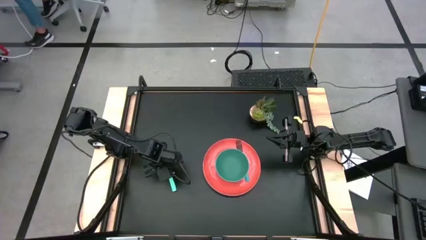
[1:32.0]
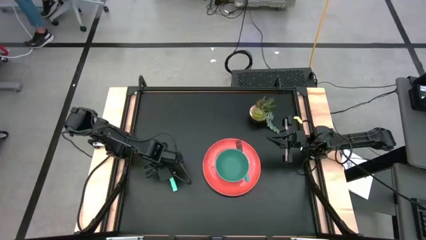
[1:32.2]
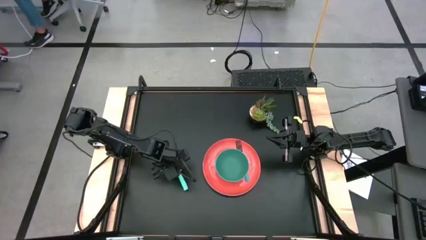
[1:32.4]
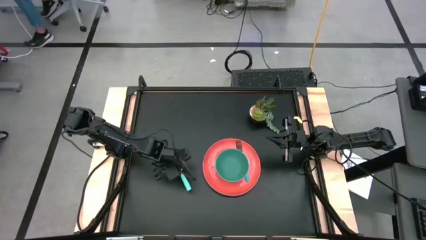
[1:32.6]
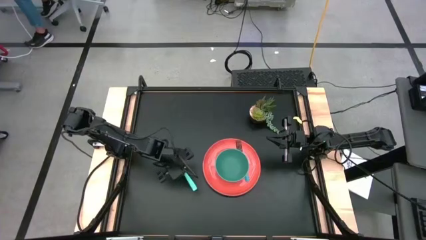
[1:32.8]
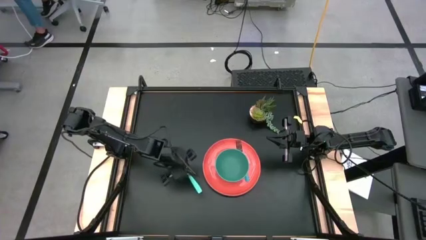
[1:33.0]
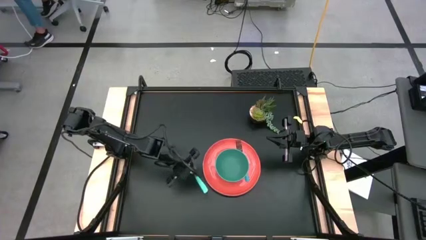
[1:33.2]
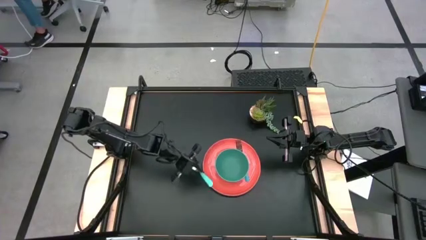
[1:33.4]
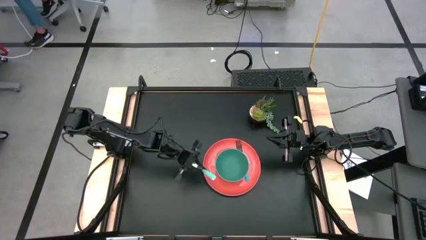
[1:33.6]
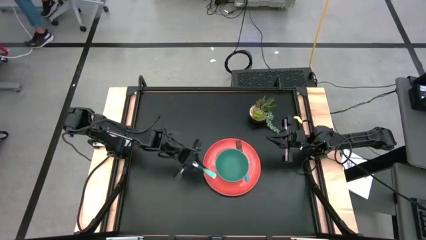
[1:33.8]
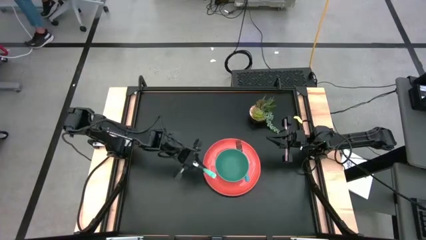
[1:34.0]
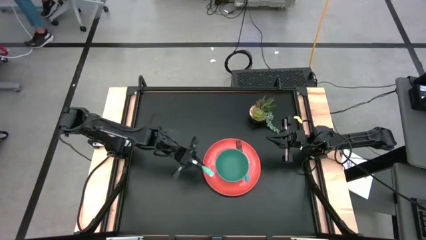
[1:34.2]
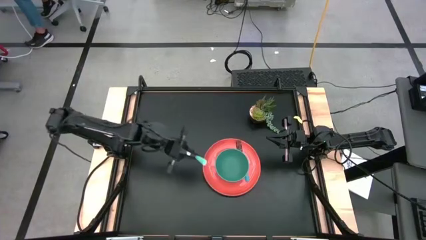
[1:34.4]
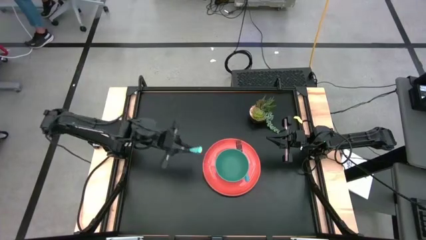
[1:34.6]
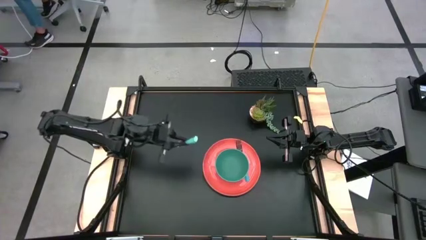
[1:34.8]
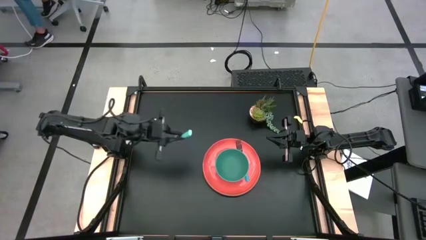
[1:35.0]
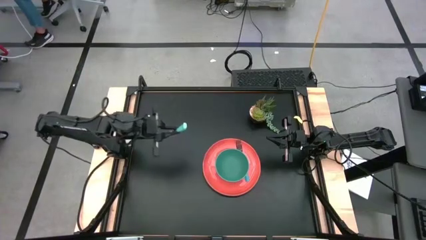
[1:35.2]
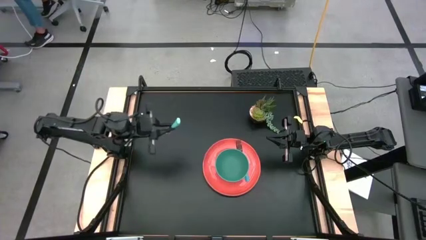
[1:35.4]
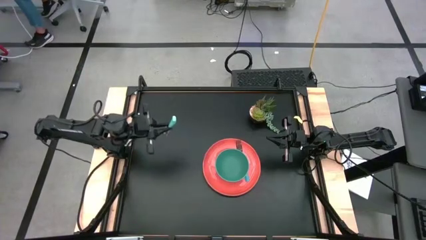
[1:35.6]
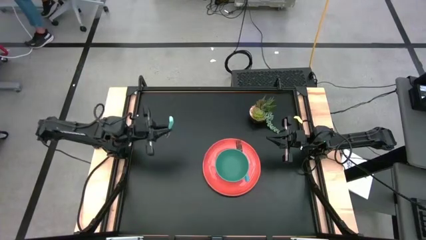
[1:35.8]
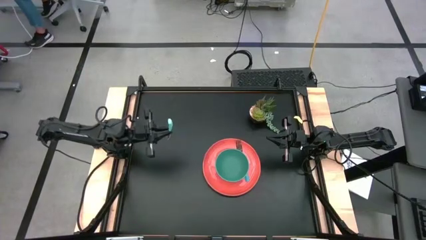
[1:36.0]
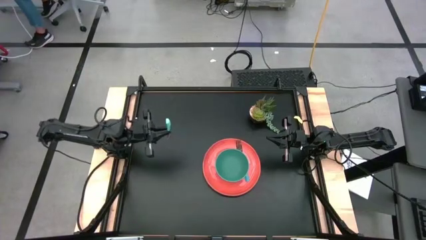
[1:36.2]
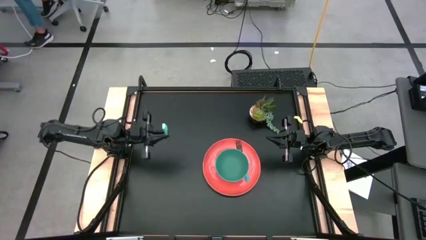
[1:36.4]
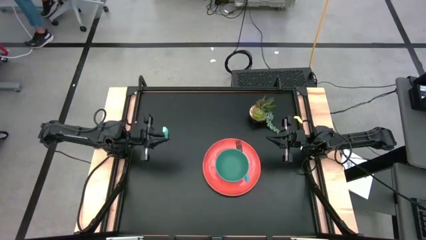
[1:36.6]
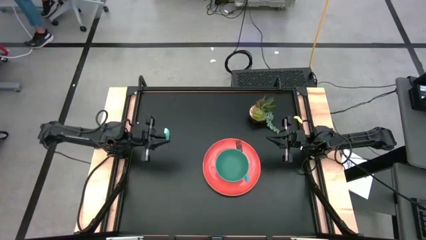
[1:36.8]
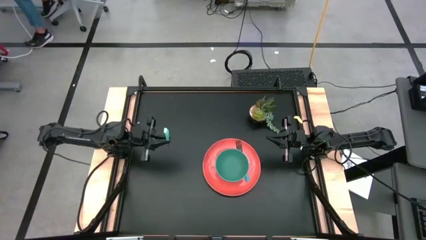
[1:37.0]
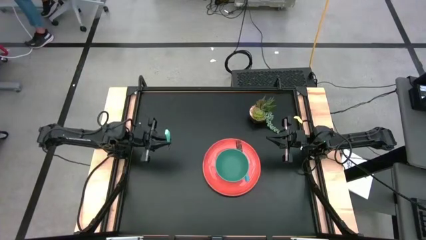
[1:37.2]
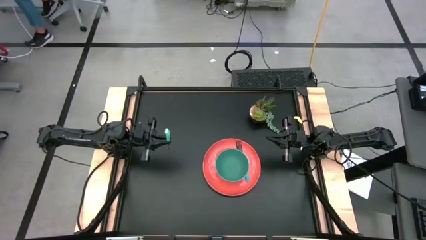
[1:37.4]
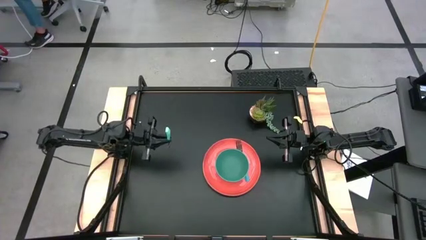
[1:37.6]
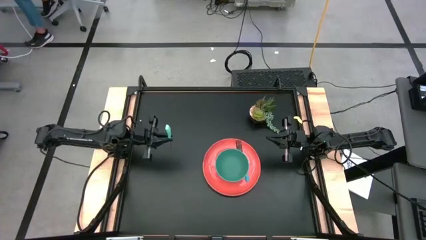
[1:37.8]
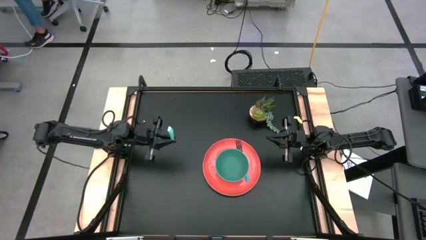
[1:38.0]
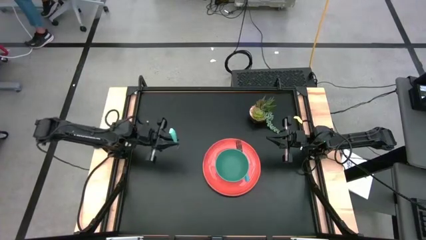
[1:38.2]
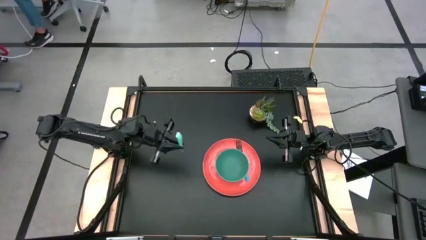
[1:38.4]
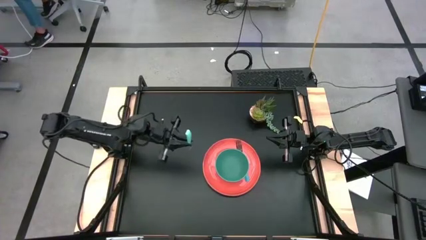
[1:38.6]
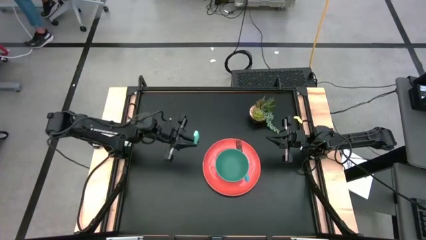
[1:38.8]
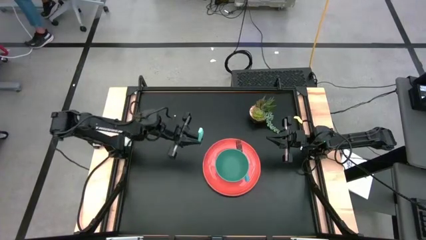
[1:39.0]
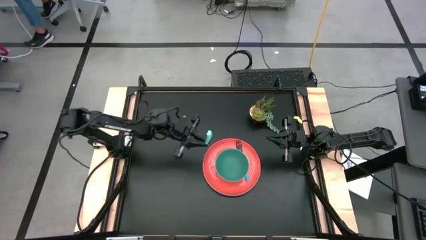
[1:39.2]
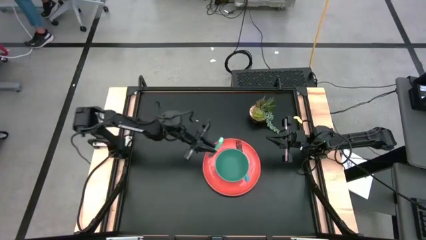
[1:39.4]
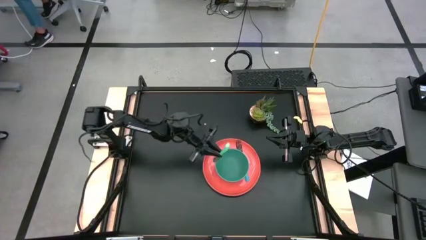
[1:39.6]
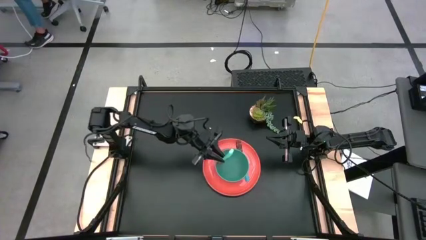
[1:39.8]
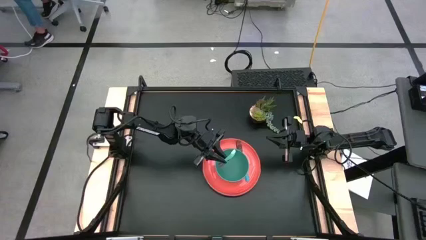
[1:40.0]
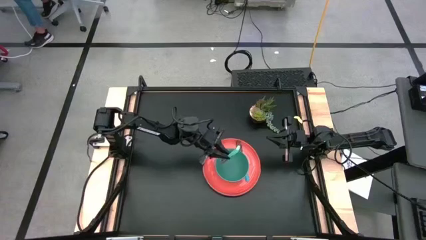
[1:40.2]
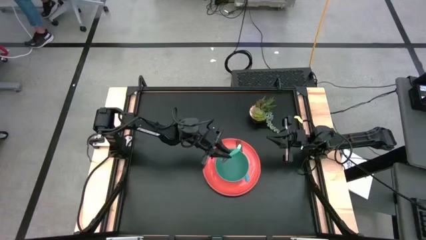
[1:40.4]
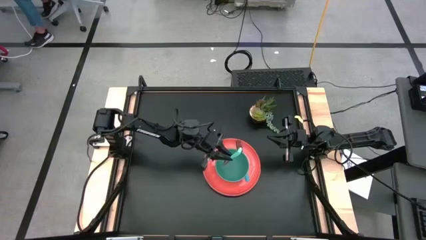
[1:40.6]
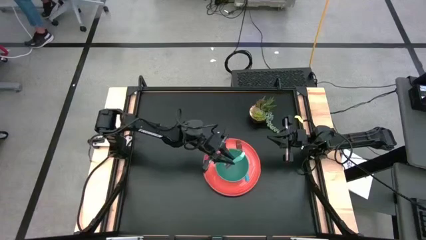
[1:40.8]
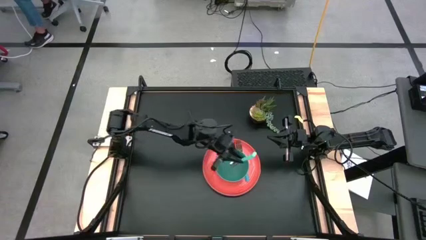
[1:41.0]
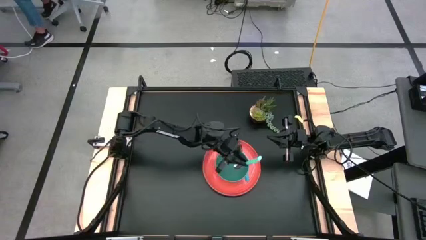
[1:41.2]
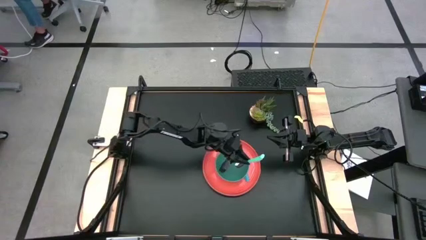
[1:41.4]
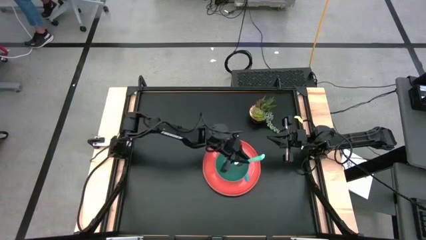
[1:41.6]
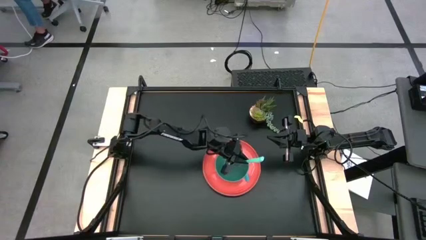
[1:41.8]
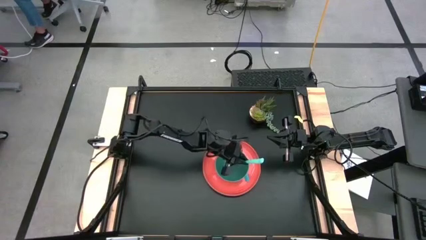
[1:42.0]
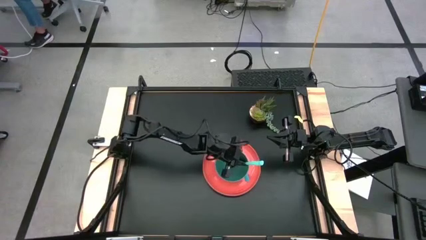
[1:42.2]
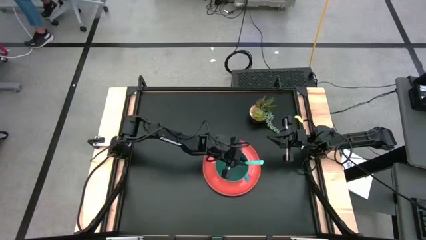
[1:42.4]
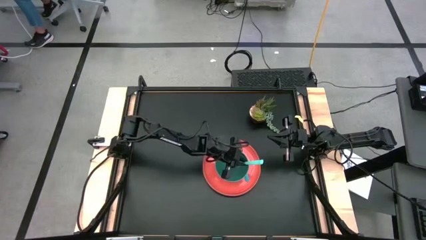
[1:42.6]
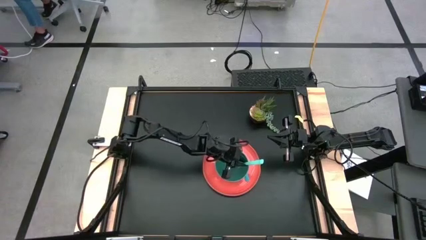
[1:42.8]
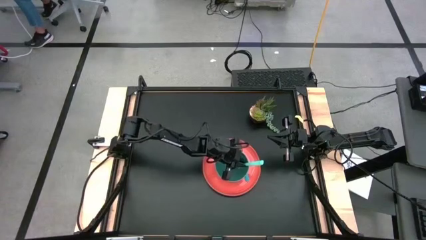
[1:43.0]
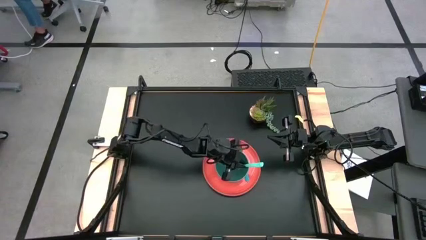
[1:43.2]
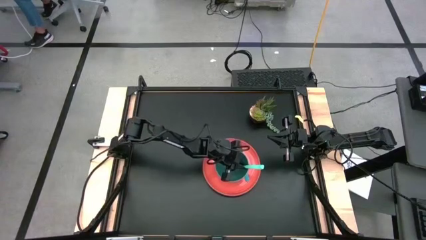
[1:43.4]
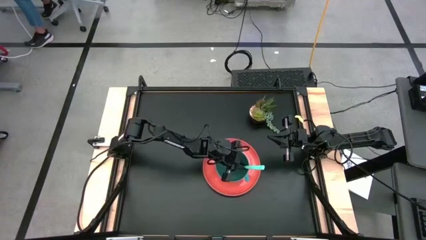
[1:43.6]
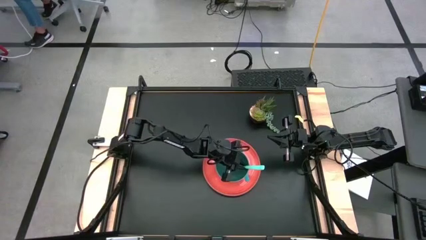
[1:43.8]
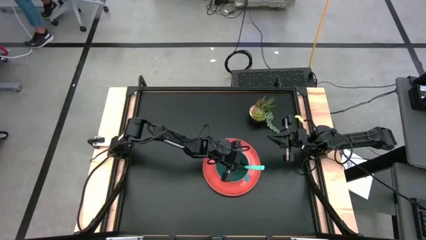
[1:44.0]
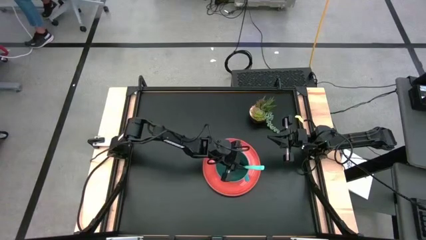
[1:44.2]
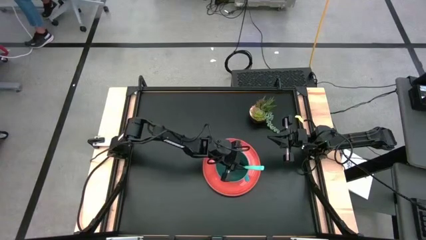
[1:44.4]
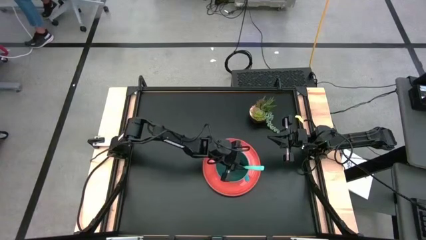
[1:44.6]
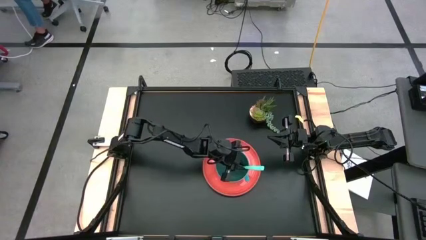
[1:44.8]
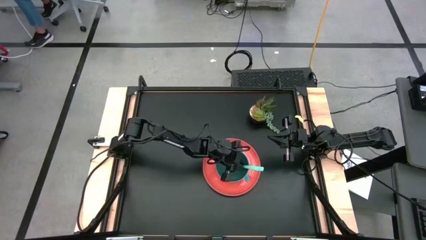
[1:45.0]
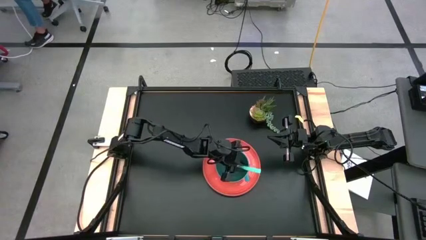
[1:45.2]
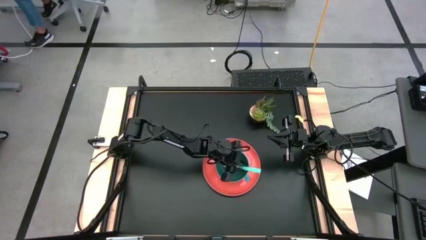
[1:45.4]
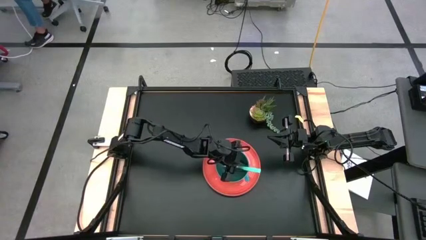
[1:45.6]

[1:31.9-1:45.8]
Task: Set table place
Put the blue spoon into the green bowl

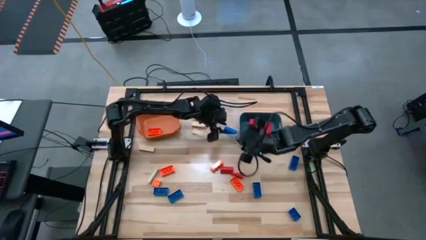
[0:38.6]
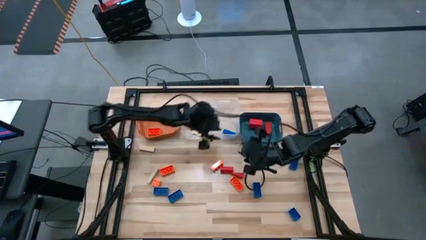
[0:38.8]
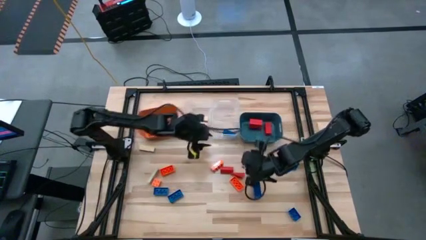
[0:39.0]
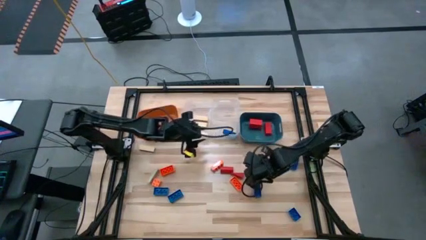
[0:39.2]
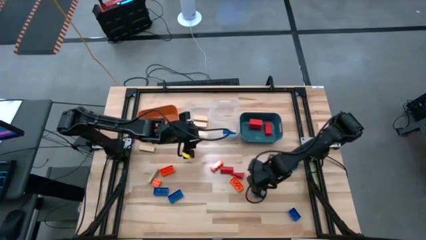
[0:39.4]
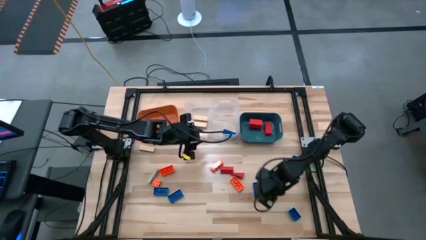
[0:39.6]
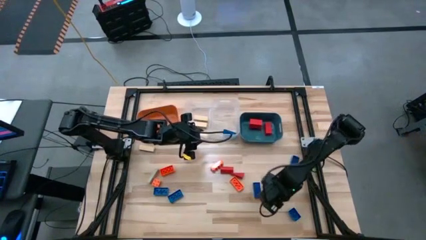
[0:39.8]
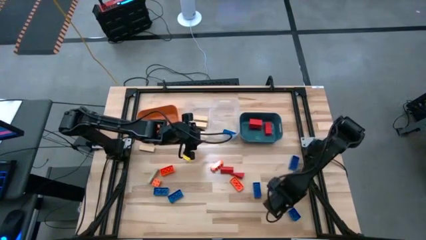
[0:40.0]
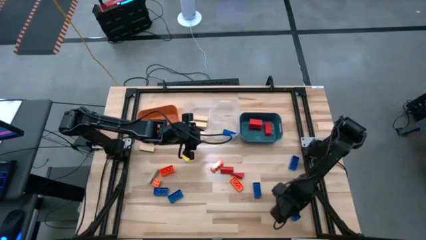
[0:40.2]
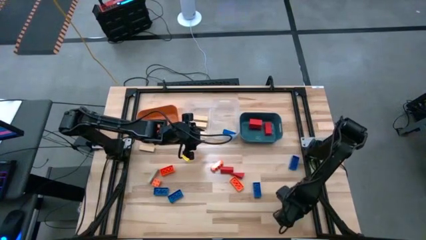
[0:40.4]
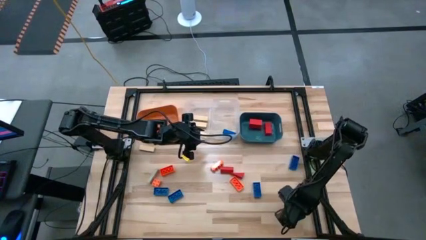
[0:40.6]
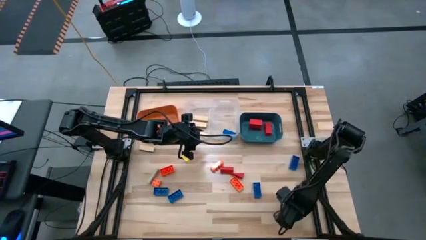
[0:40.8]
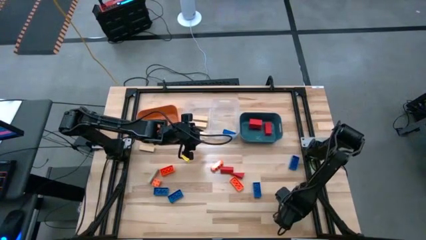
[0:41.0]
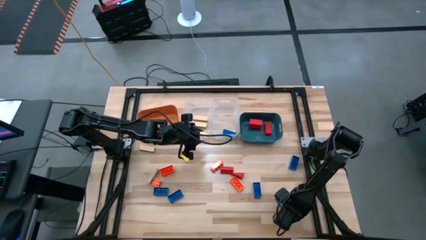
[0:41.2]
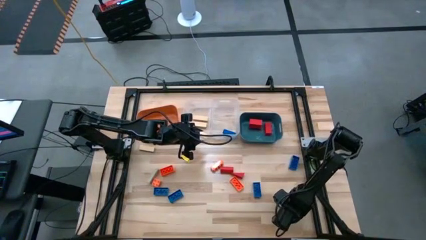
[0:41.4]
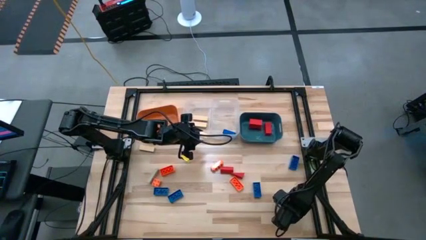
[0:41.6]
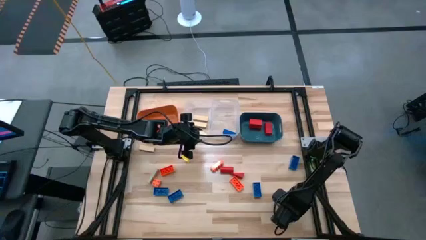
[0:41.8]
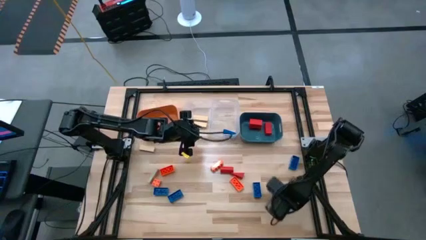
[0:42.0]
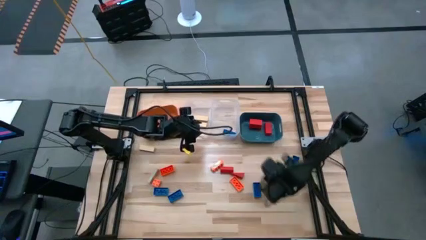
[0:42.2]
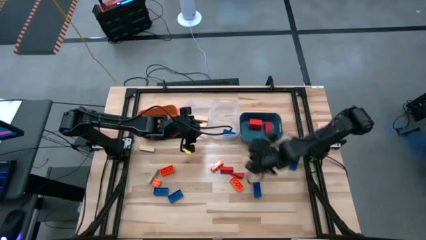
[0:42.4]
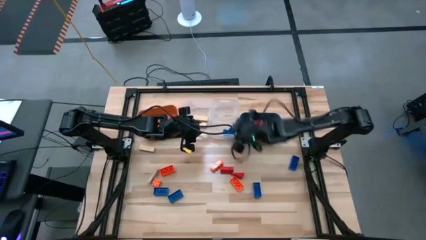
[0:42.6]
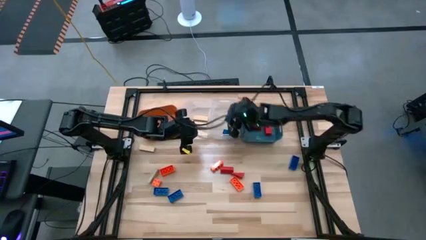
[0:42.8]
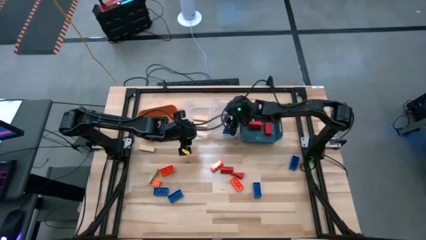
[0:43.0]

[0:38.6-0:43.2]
Task: Sort blocks
Put the blue game piece into the right transparent bin
